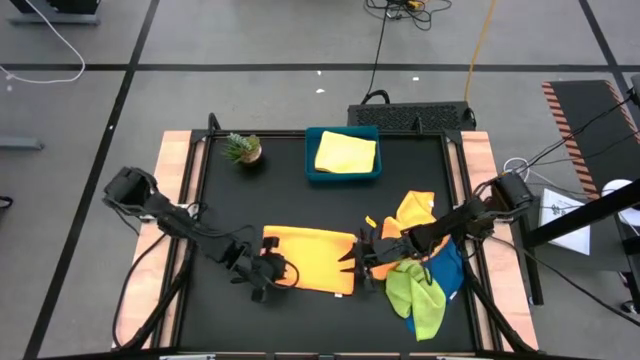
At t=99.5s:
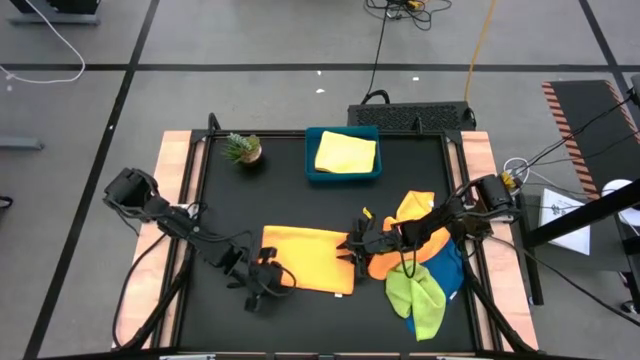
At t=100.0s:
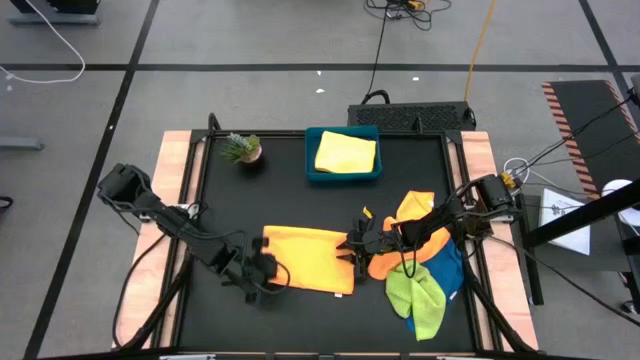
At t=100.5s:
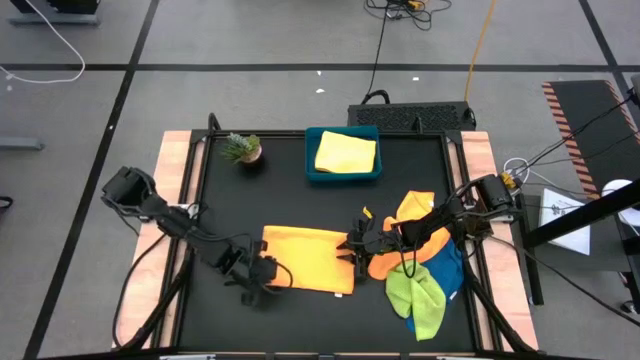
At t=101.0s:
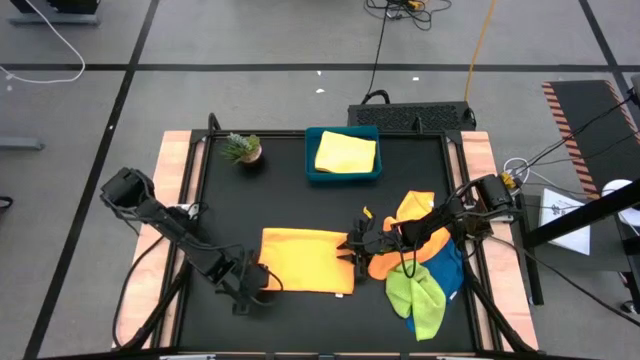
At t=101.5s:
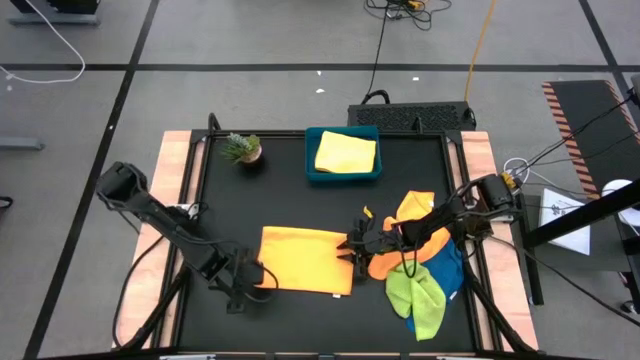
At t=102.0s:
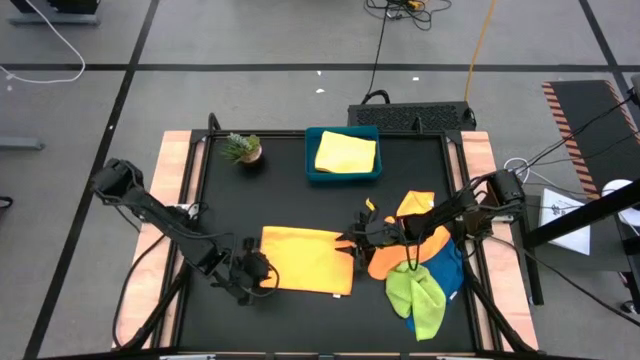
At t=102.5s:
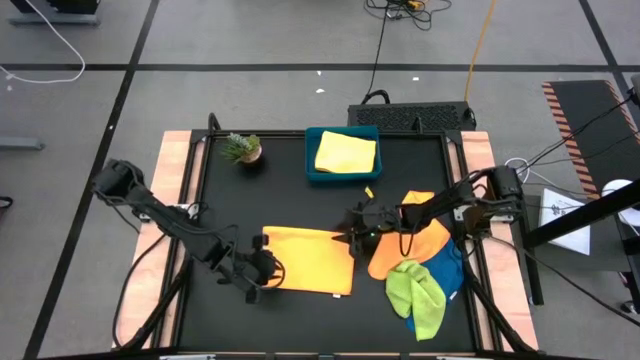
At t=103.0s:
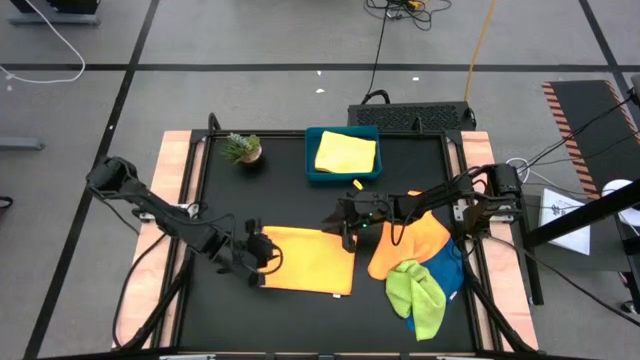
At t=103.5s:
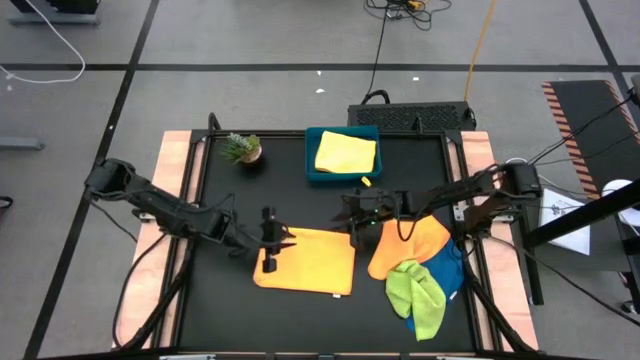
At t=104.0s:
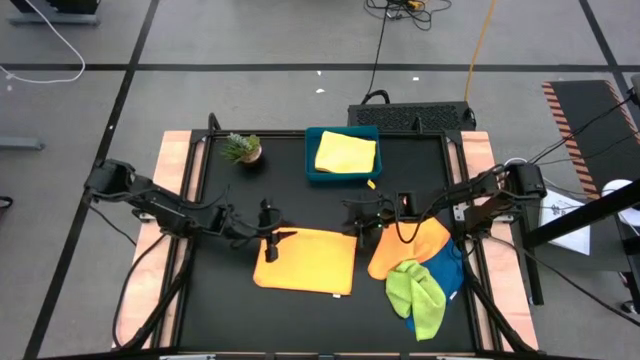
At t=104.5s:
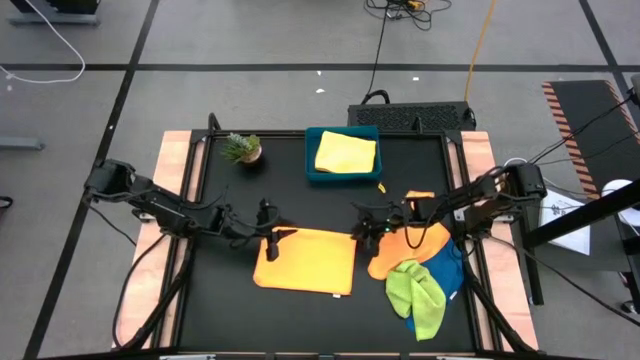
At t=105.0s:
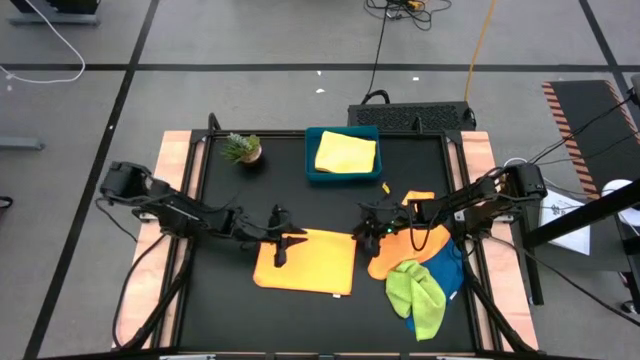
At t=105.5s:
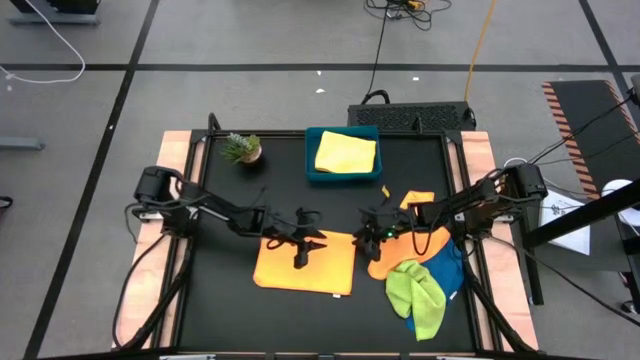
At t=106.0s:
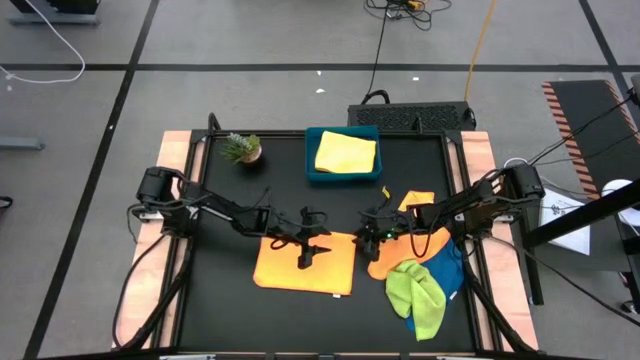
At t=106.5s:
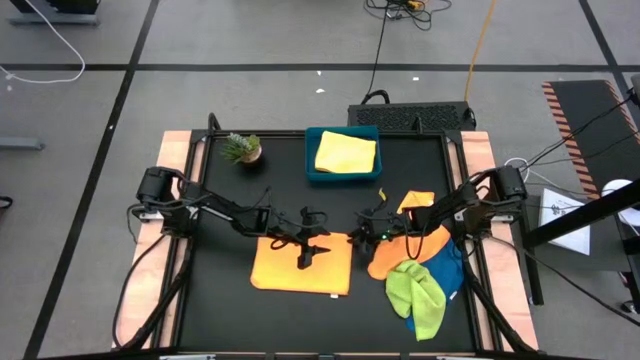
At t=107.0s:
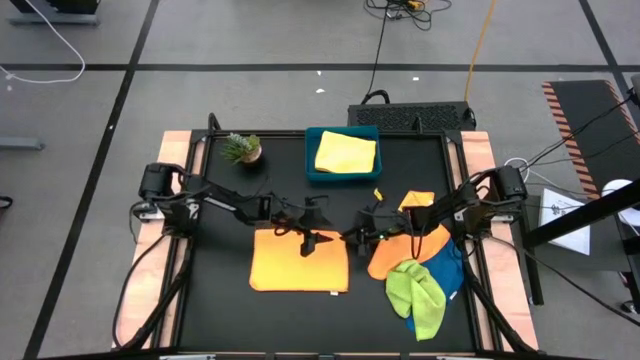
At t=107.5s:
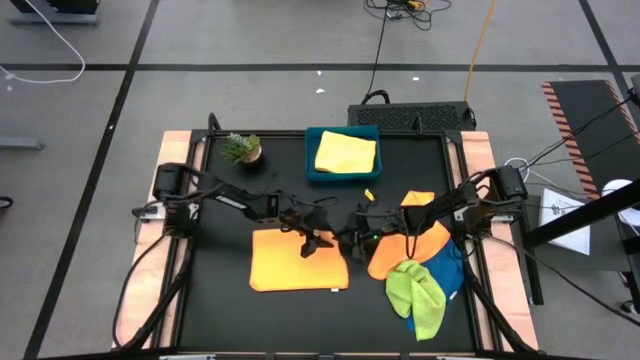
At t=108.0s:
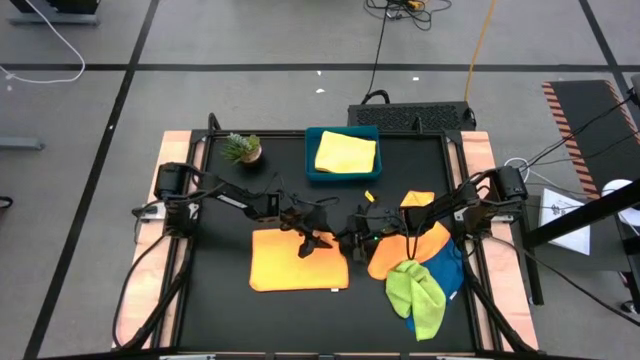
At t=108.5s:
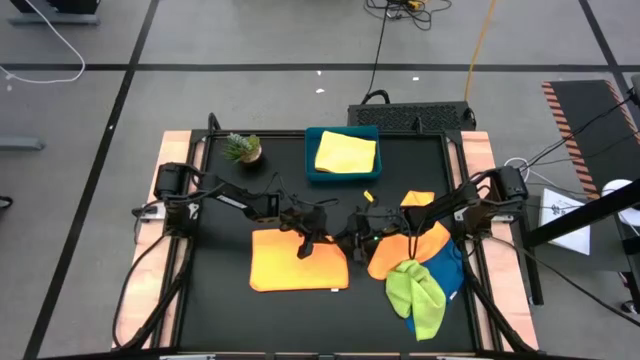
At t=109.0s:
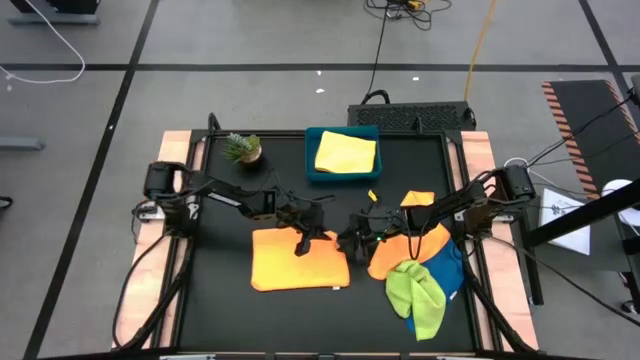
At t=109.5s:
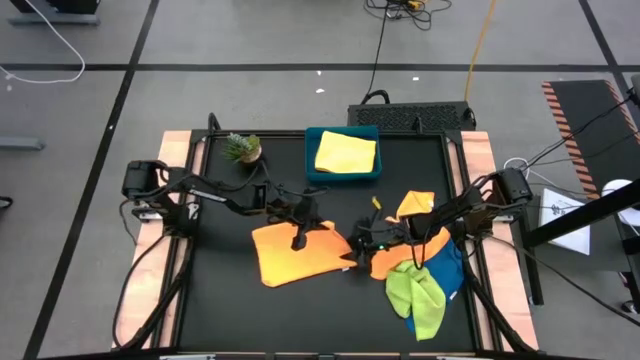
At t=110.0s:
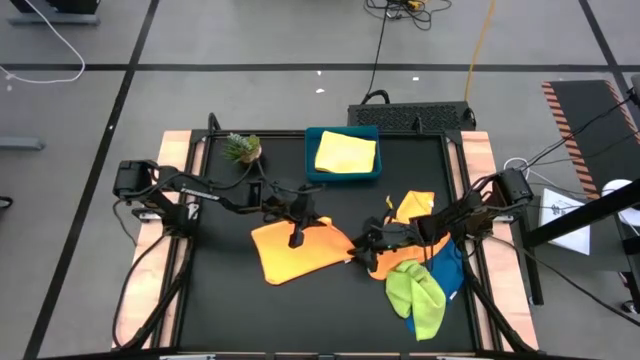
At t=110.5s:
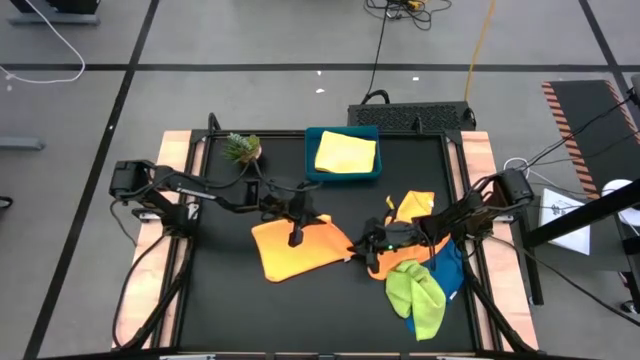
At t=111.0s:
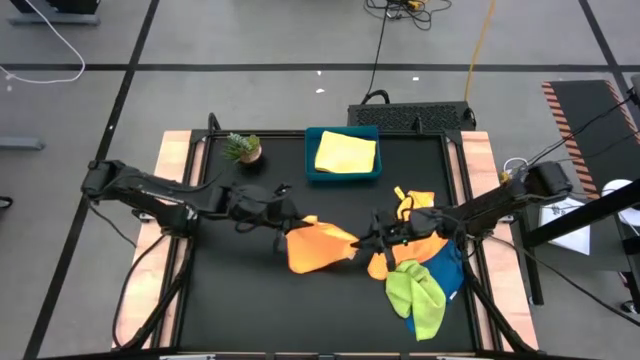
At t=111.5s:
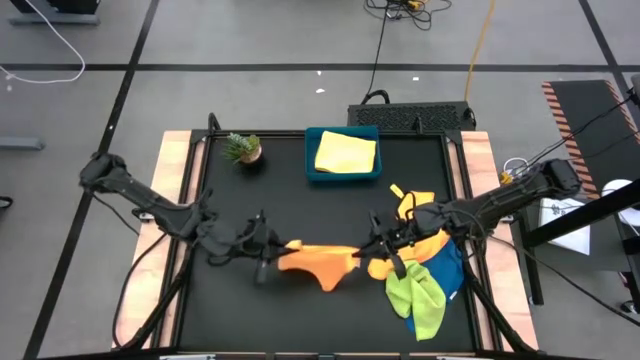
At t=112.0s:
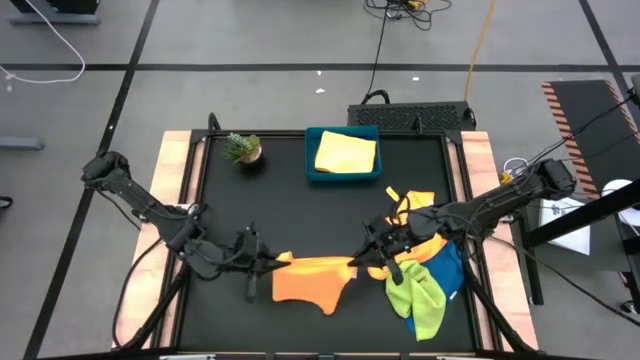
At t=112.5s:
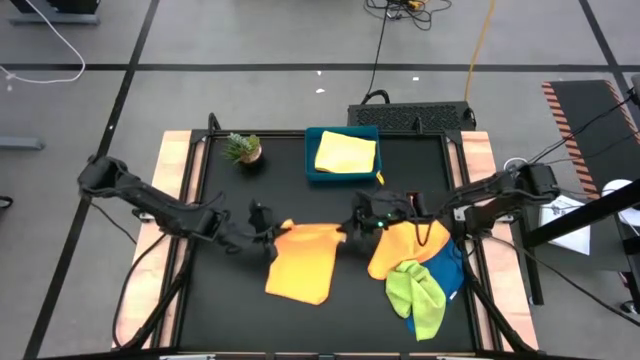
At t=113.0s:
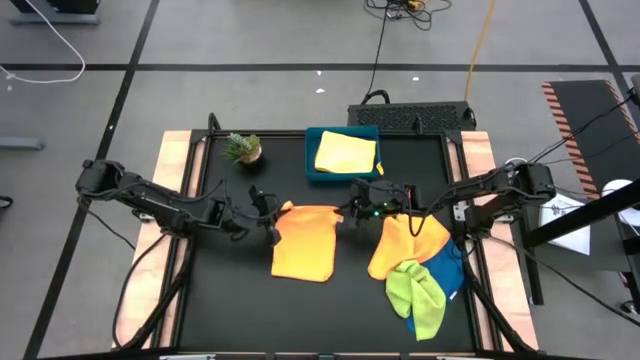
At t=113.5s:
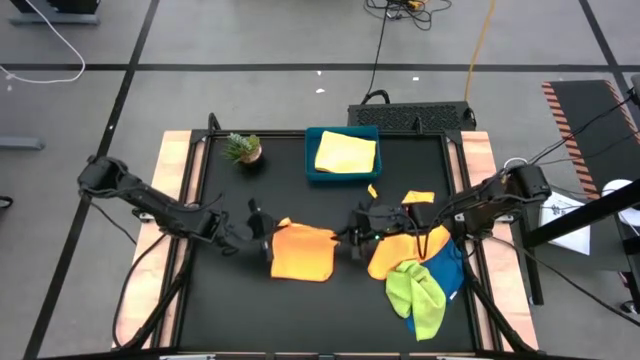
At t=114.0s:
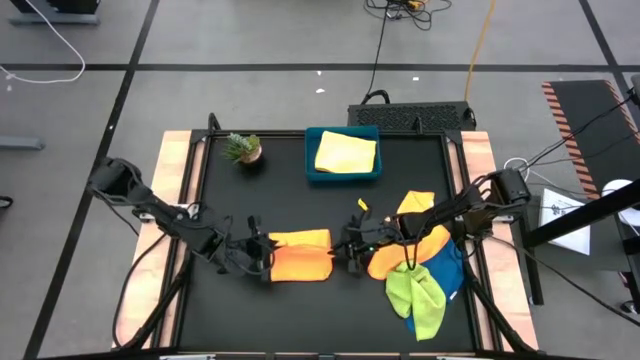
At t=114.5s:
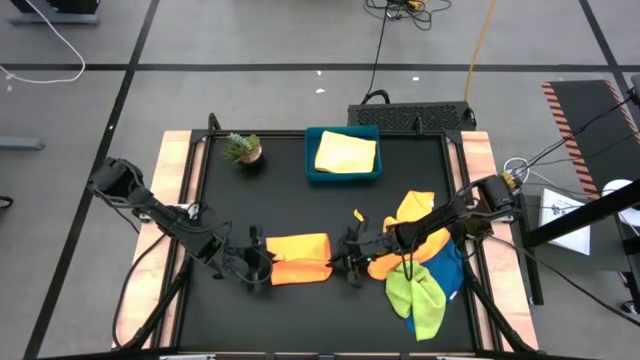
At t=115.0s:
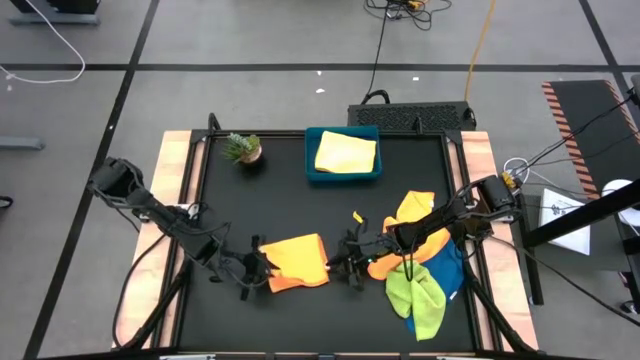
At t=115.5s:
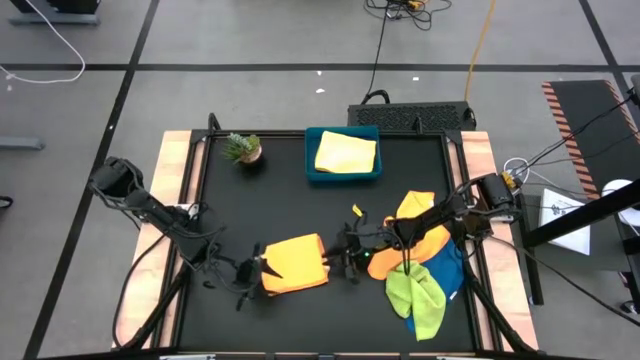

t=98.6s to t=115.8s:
Task: Fold microfiber towels
Fold the left orange microfiber cloth

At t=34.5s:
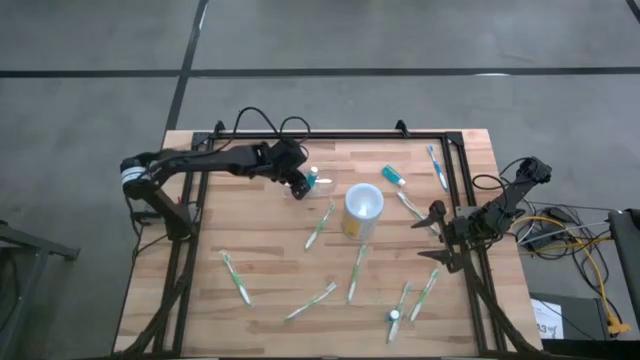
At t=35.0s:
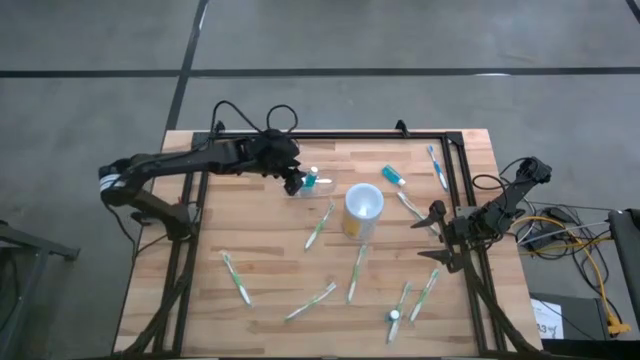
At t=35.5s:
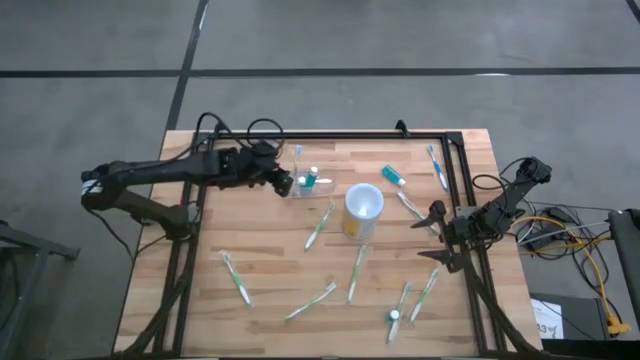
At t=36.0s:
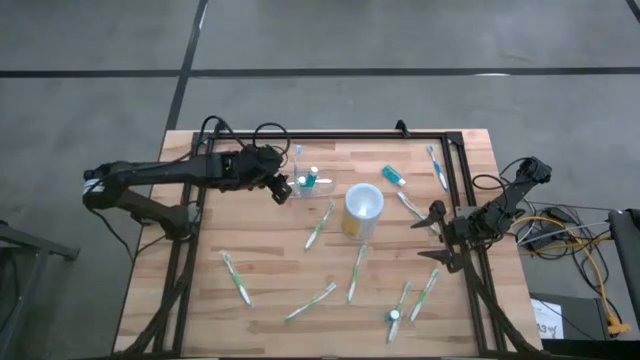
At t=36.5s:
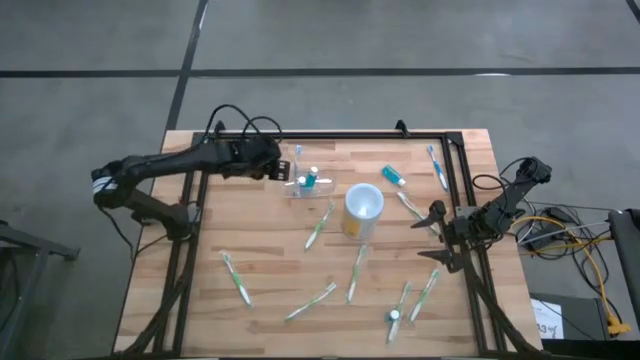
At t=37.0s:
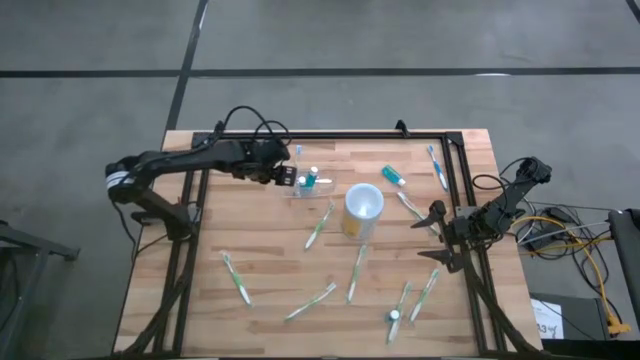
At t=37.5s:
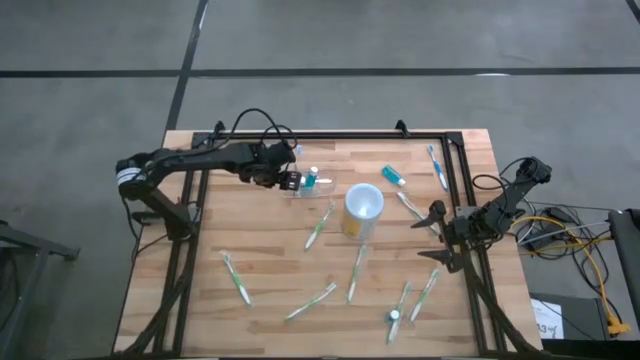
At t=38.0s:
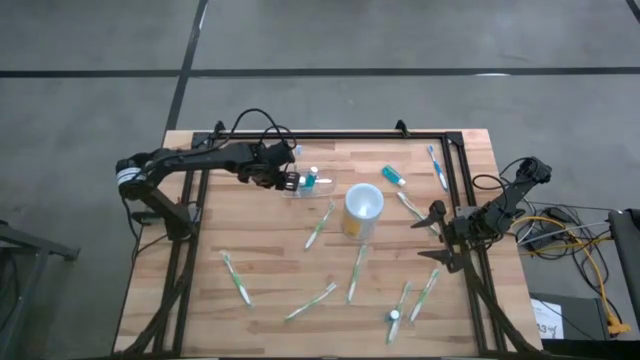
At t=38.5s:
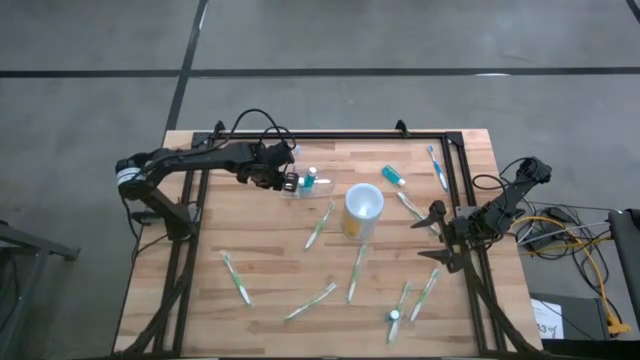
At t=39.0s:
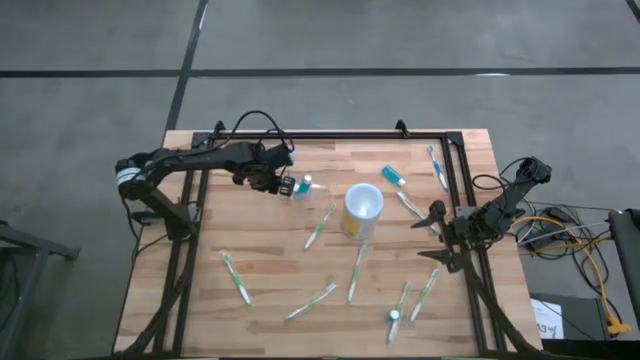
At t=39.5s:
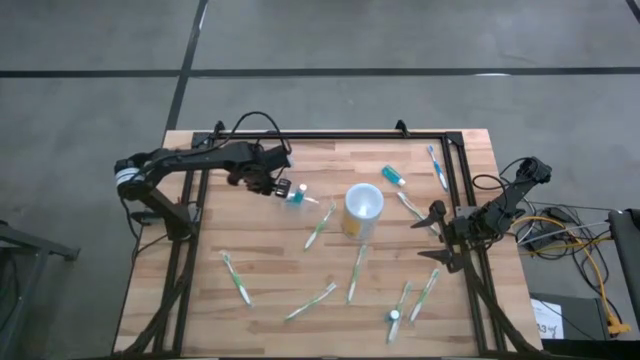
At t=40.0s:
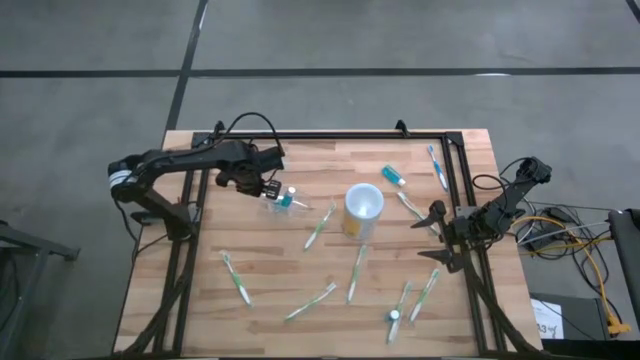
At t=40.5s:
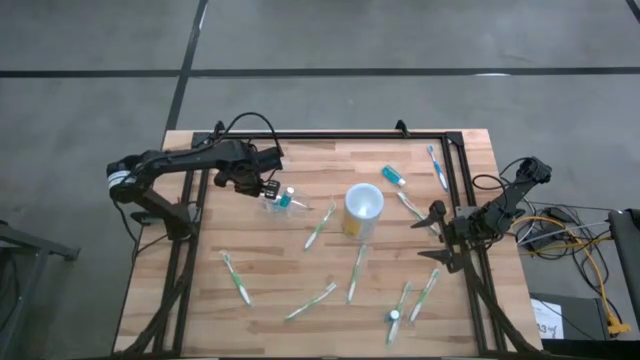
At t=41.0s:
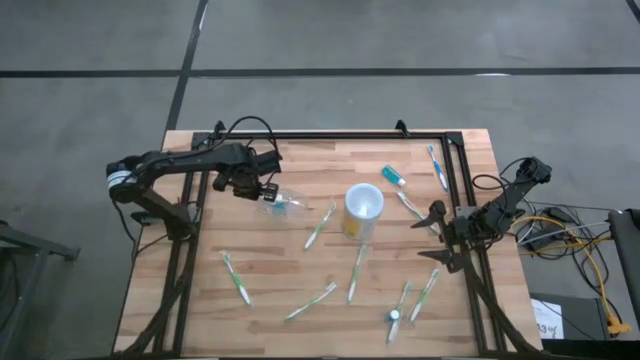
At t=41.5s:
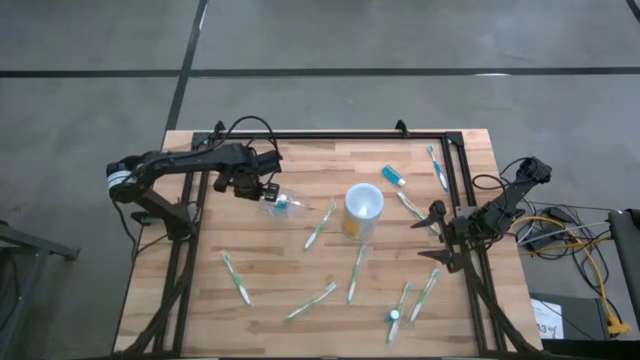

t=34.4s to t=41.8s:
Task: Pick & Place toothbrushing station
Adjust the transparent organizer on the table
